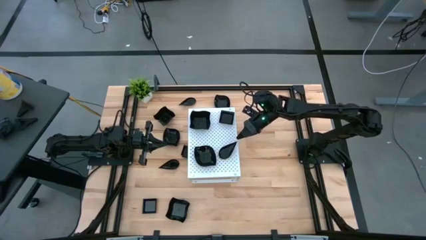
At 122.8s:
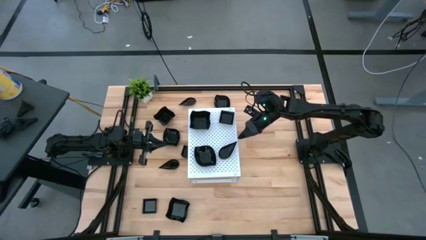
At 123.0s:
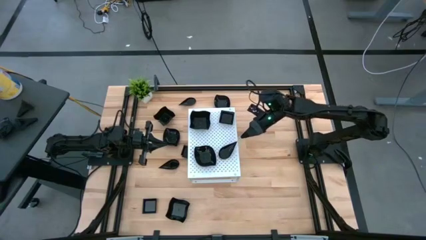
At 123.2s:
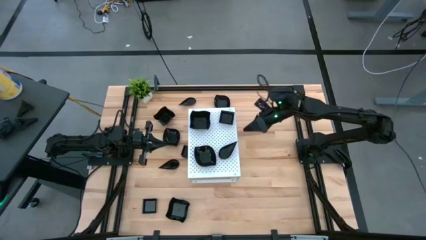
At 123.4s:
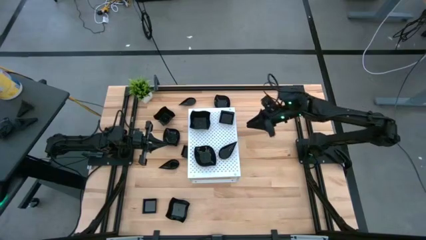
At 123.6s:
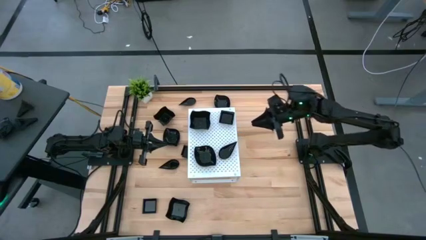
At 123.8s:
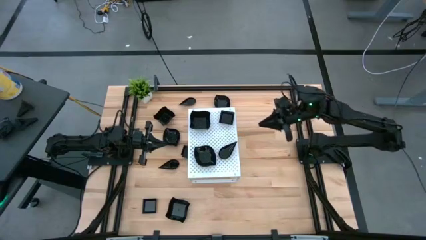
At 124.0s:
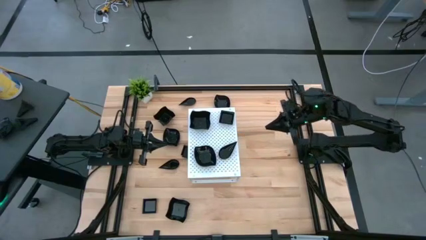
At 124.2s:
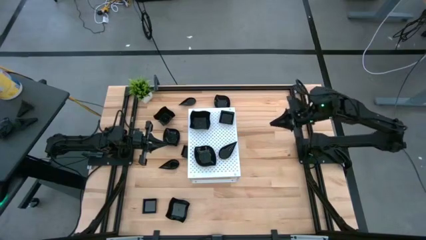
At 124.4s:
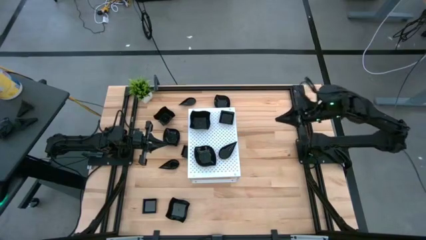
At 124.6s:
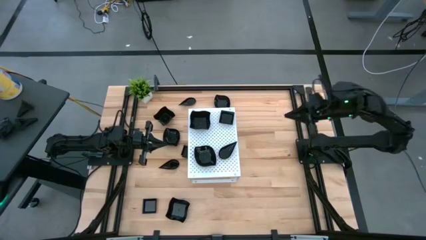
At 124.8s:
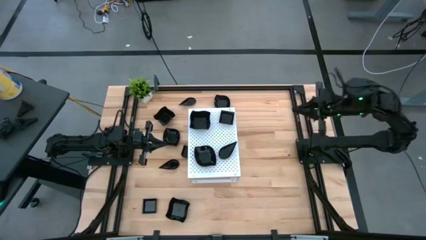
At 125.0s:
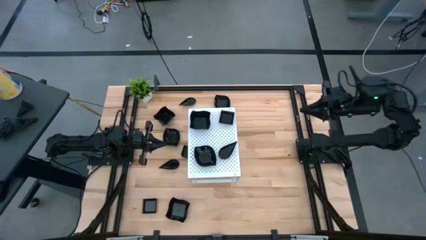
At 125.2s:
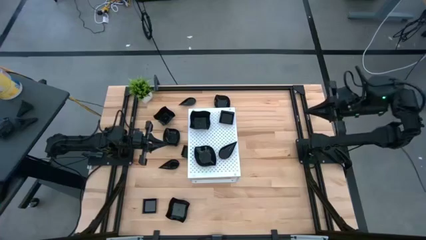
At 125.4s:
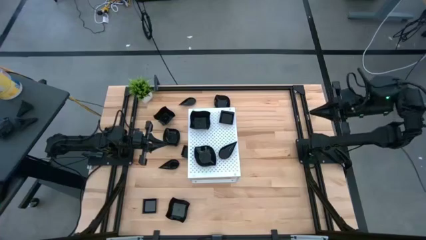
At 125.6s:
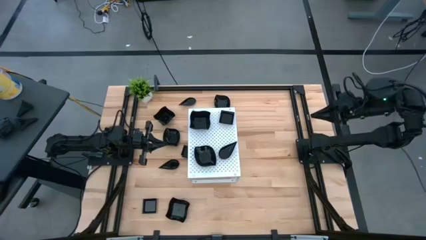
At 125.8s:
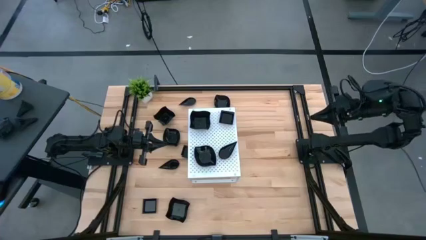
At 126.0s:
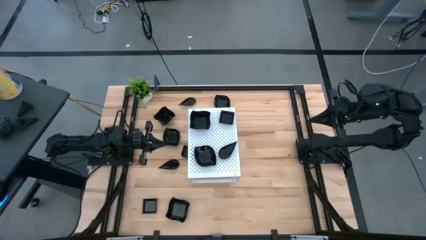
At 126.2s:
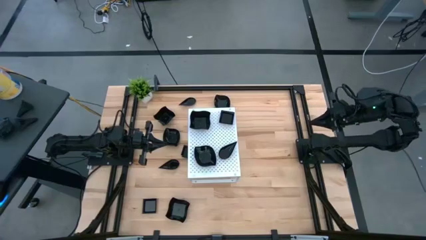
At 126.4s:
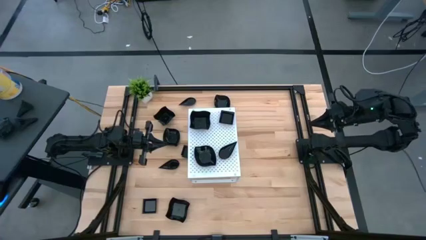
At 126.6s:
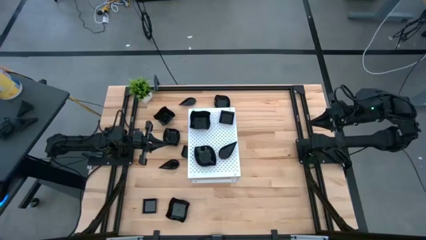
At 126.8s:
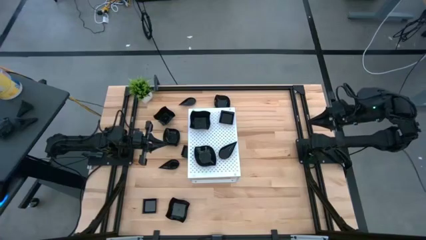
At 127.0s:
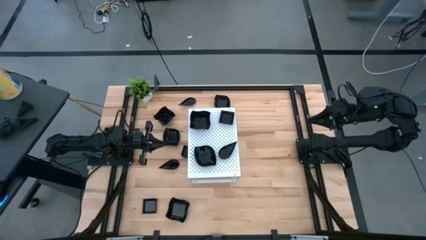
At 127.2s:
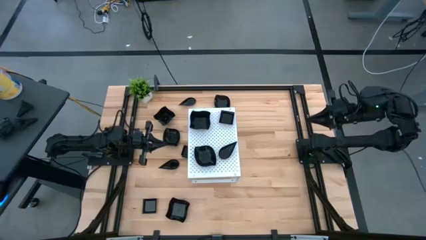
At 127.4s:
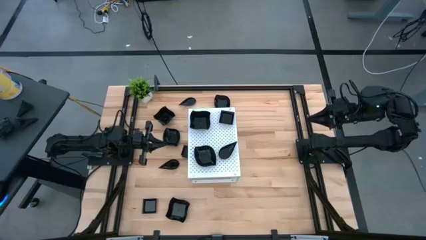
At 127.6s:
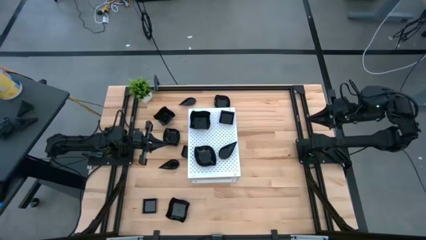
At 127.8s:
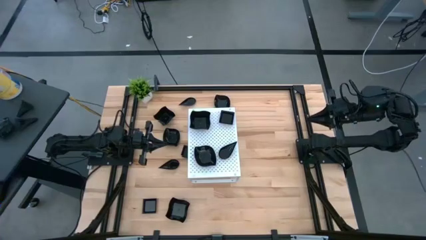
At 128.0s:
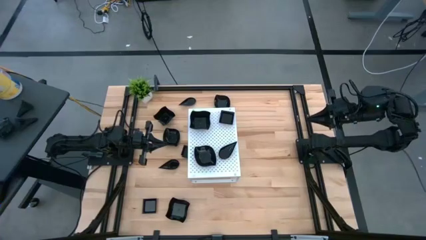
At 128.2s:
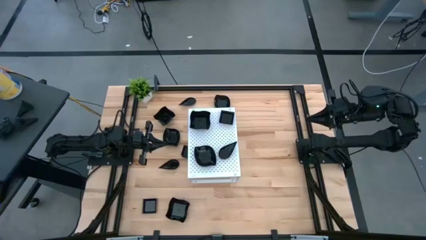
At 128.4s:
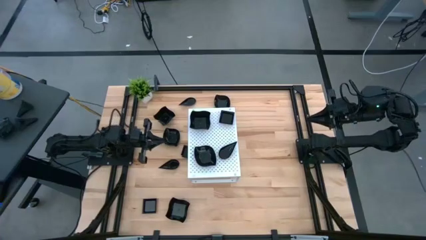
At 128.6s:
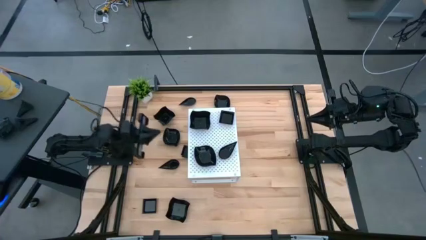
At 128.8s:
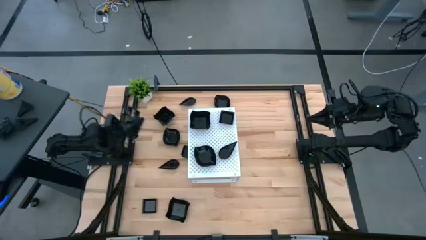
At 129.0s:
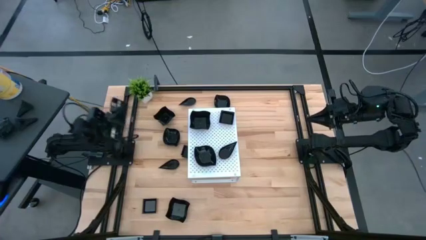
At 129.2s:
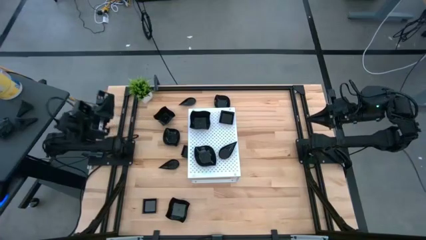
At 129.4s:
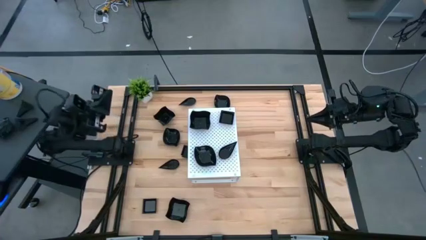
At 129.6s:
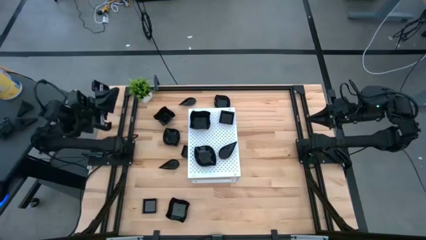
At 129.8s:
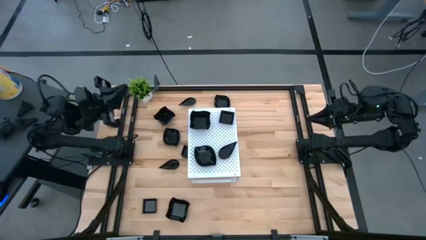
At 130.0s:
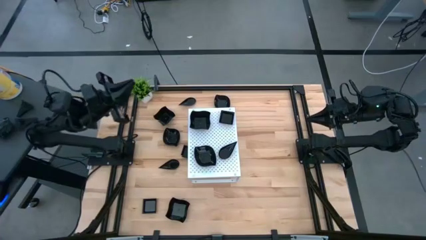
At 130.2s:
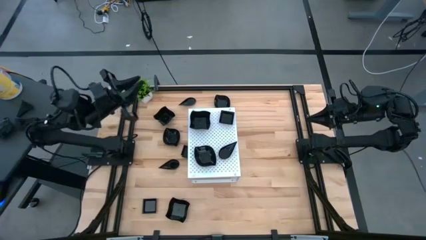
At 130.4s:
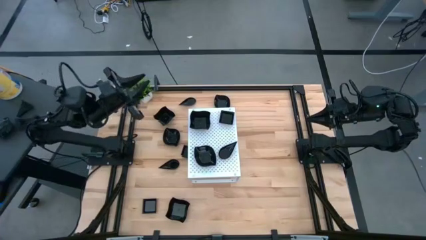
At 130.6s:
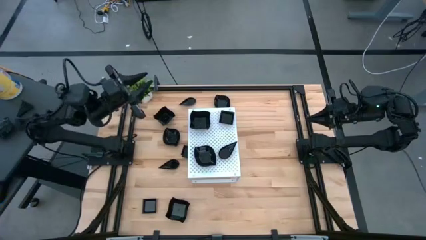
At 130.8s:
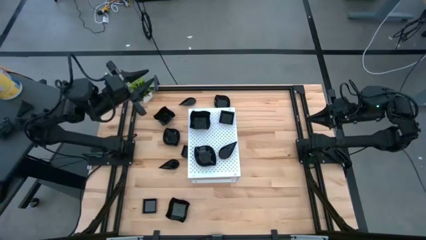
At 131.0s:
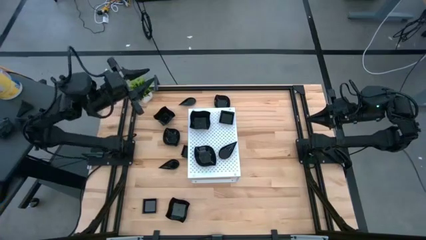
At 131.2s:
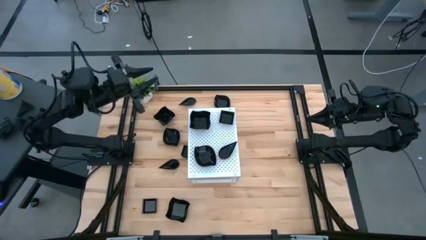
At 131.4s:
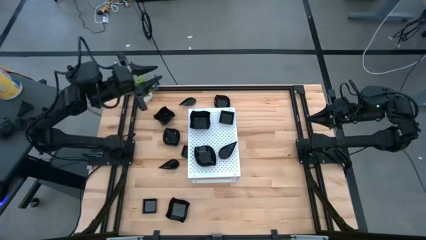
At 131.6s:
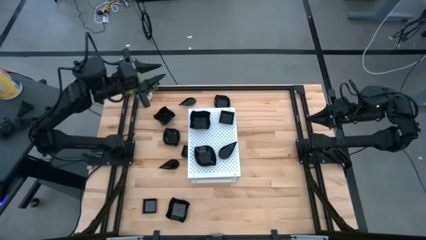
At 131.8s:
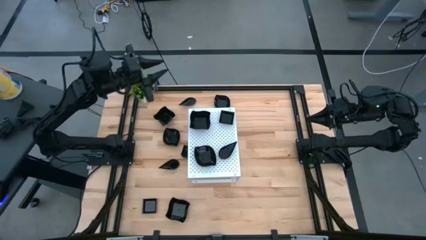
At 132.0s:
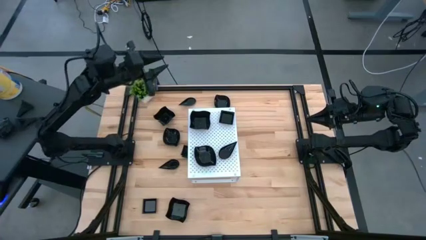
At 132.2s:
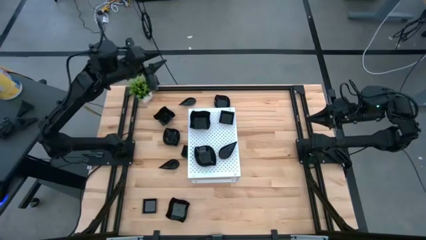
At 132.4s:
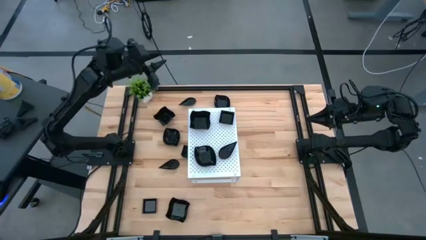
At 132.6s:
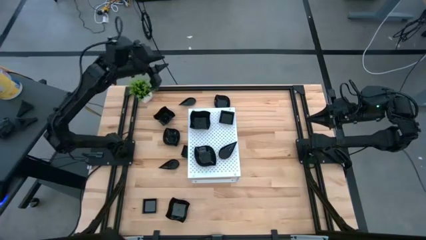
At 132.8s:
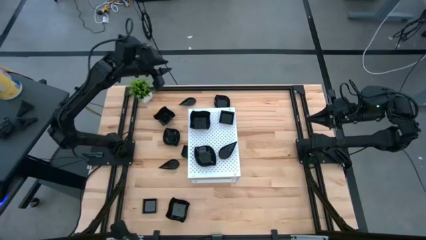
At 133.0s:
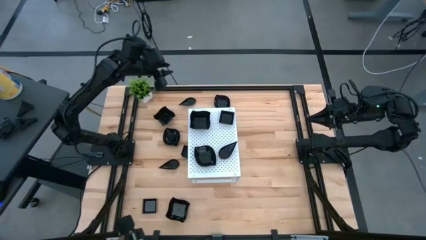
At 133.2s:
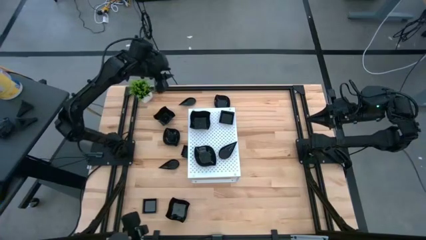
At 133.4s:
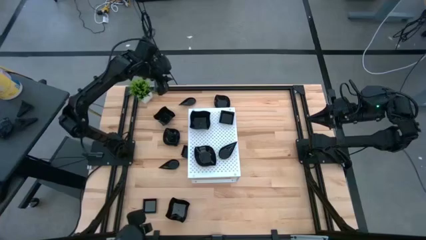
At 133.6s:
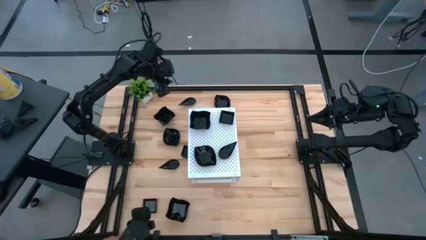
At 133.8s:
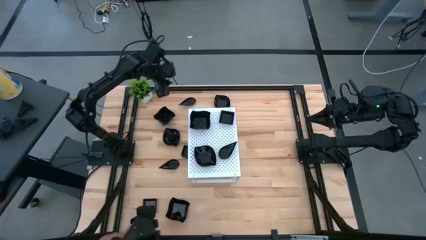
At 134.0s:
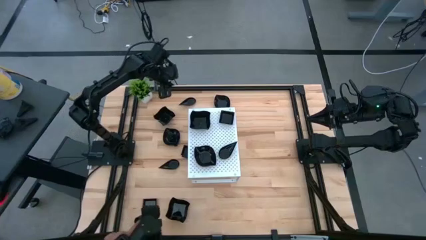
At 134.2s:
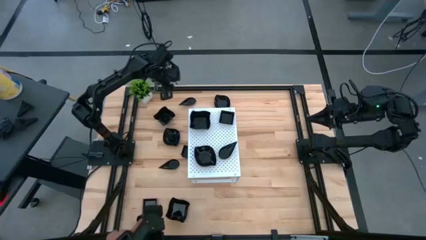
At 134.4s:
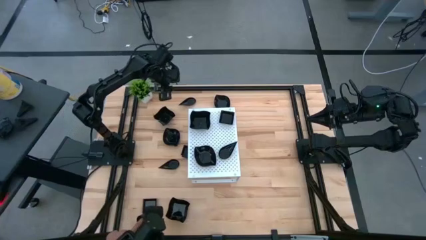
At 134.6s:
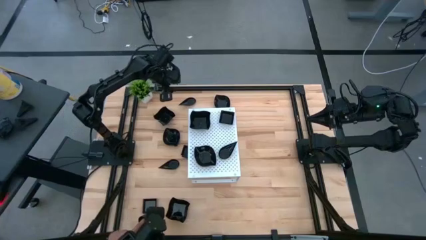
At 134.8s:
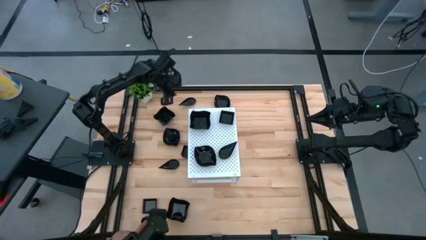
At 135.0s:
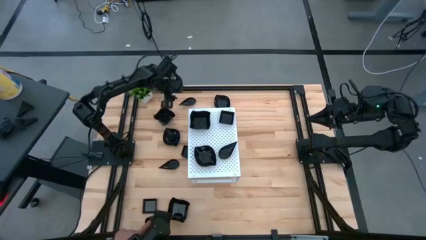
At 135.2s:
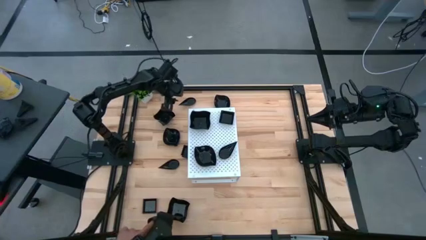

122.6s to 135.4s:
Task: Pick & Place Mini shaped plates
Stack the black drop shaped plate on top of the other black drop shaped plate on the shelf
